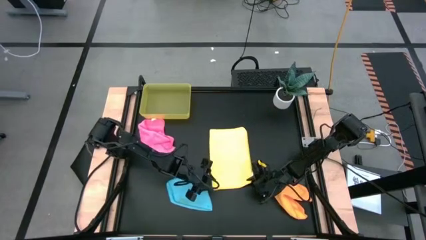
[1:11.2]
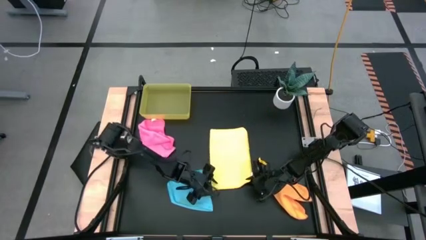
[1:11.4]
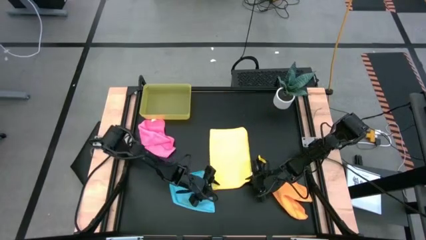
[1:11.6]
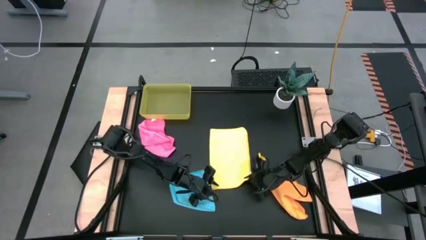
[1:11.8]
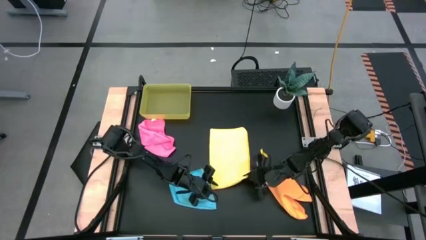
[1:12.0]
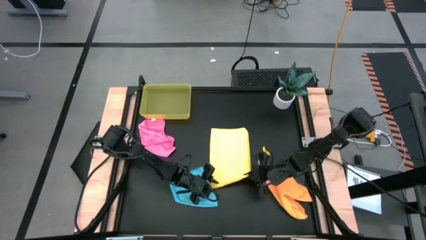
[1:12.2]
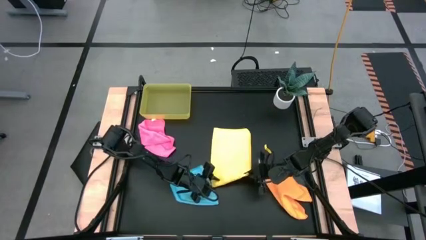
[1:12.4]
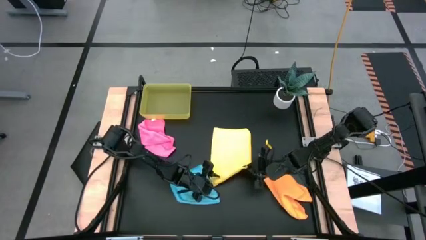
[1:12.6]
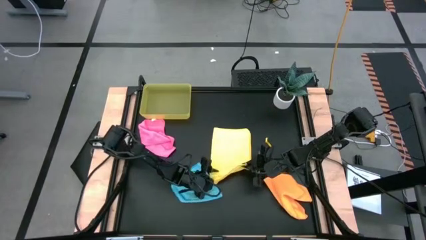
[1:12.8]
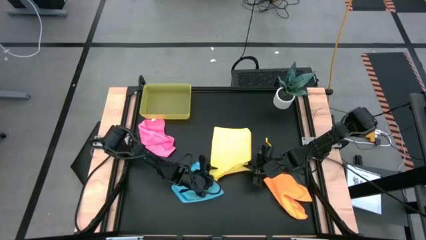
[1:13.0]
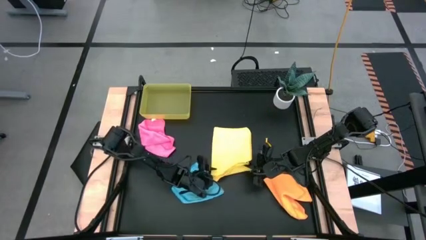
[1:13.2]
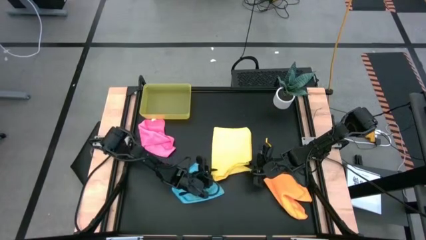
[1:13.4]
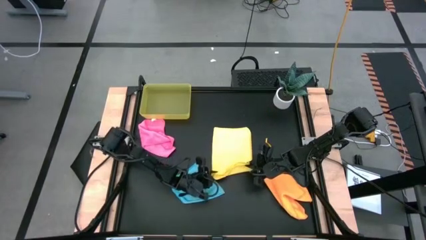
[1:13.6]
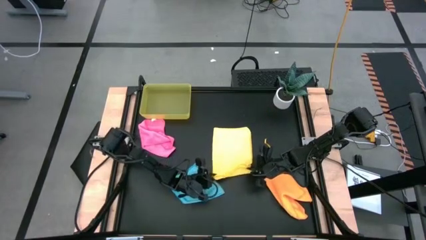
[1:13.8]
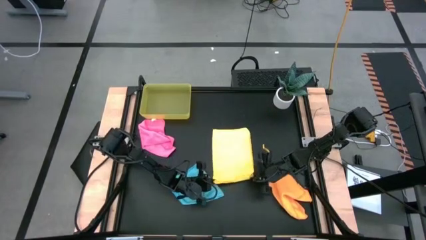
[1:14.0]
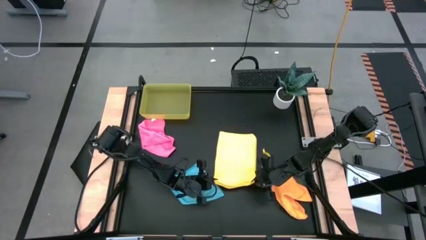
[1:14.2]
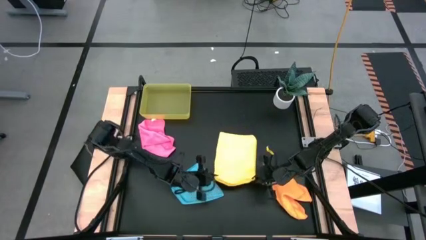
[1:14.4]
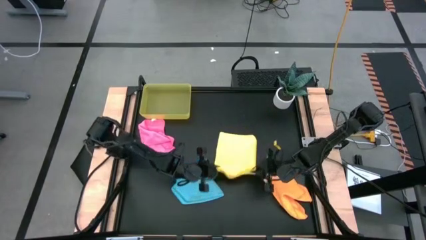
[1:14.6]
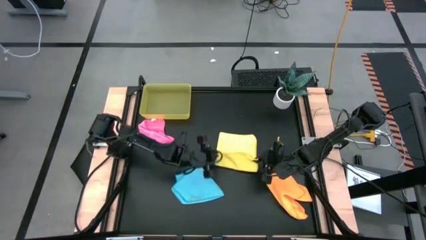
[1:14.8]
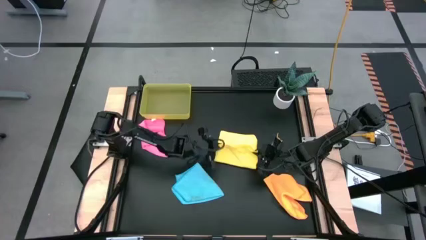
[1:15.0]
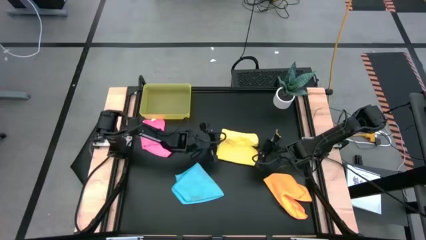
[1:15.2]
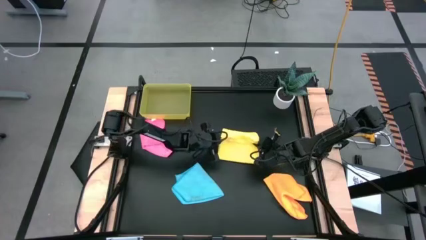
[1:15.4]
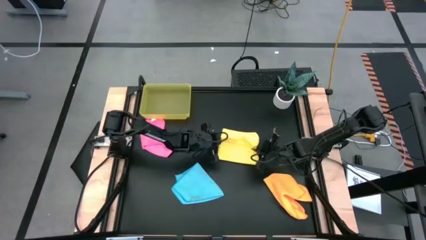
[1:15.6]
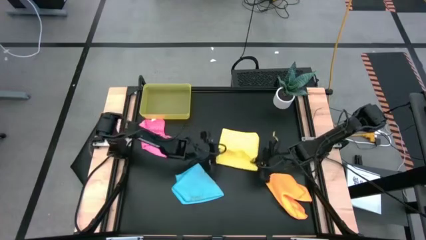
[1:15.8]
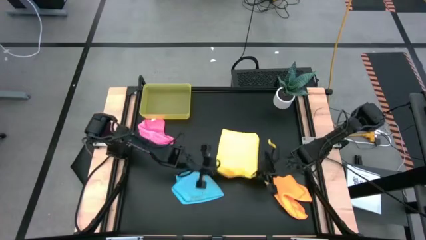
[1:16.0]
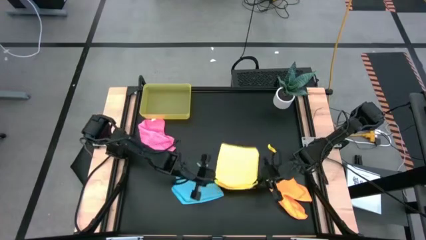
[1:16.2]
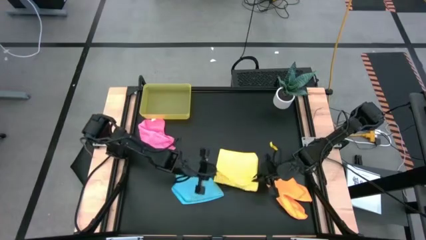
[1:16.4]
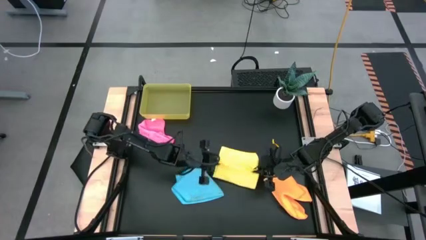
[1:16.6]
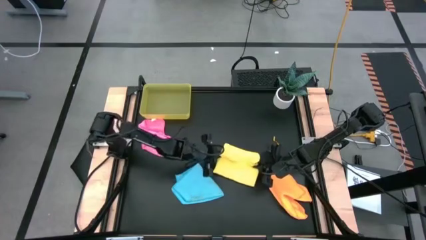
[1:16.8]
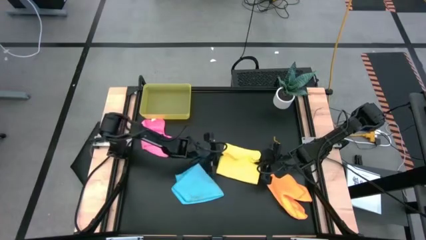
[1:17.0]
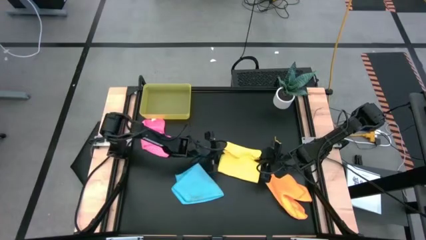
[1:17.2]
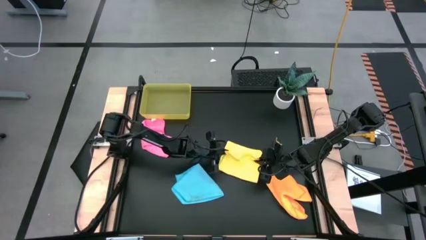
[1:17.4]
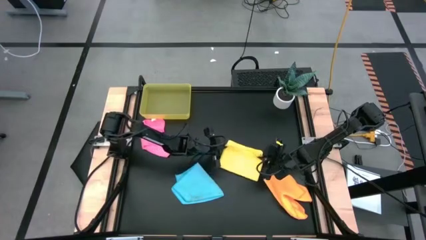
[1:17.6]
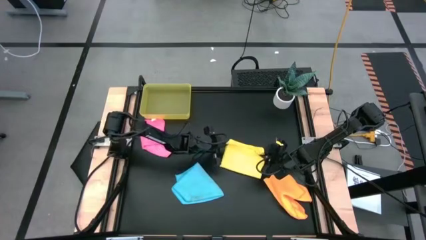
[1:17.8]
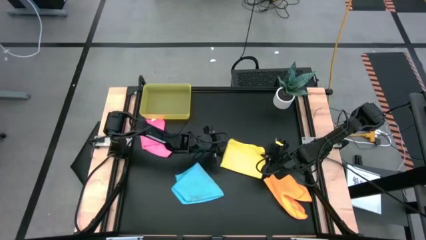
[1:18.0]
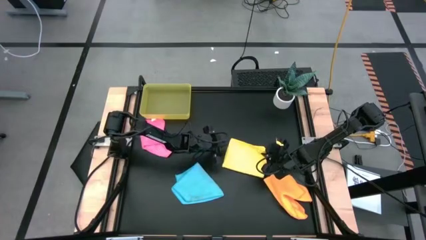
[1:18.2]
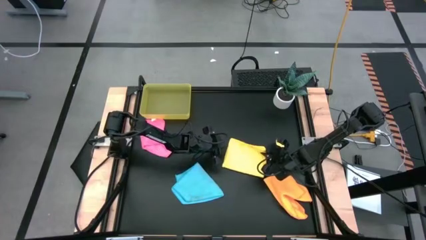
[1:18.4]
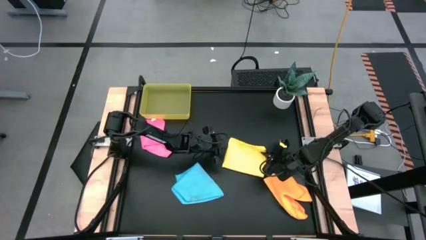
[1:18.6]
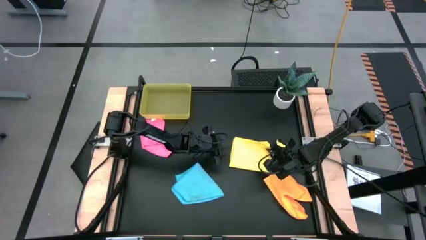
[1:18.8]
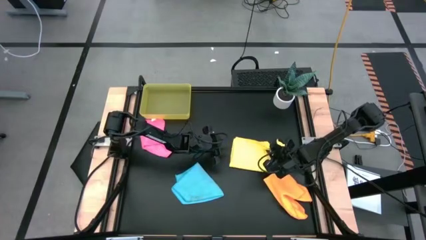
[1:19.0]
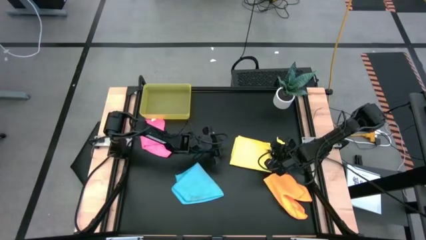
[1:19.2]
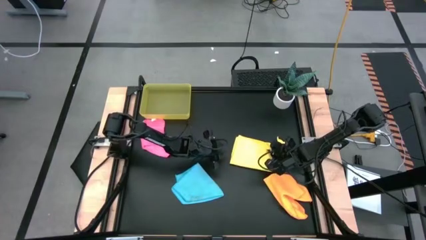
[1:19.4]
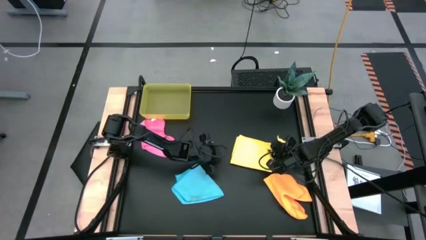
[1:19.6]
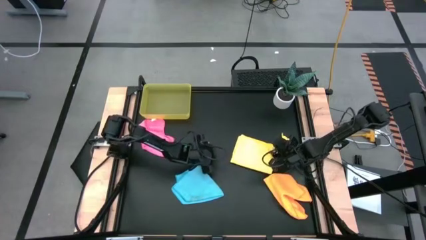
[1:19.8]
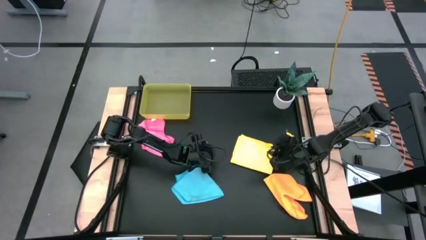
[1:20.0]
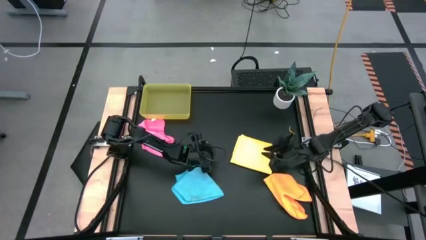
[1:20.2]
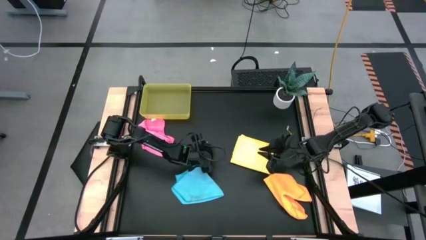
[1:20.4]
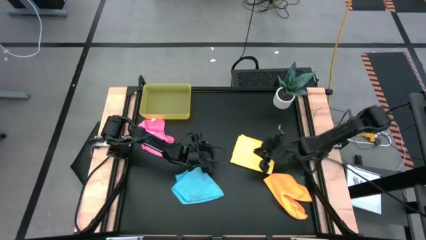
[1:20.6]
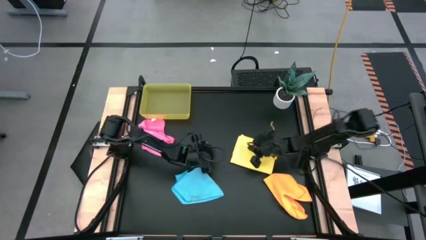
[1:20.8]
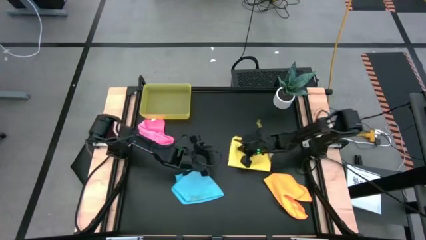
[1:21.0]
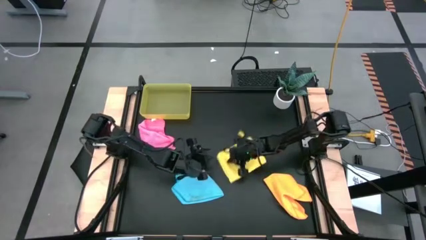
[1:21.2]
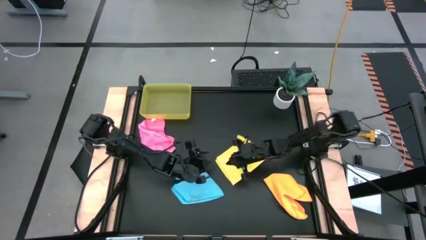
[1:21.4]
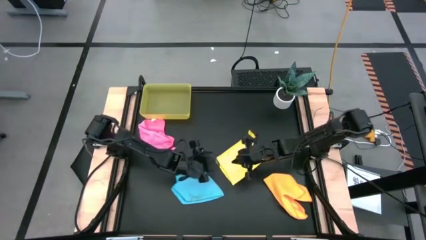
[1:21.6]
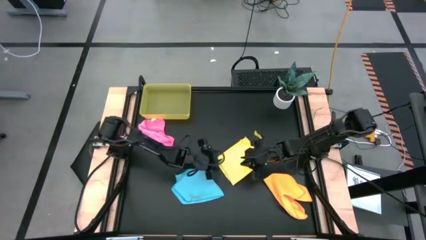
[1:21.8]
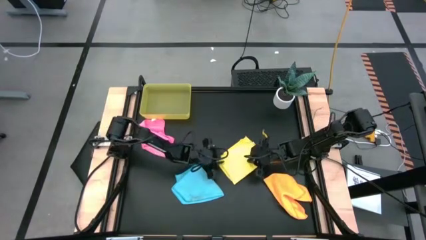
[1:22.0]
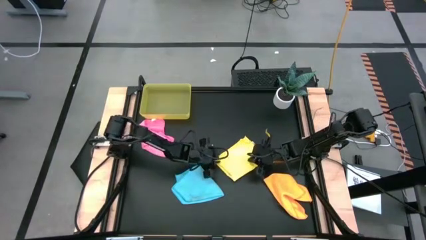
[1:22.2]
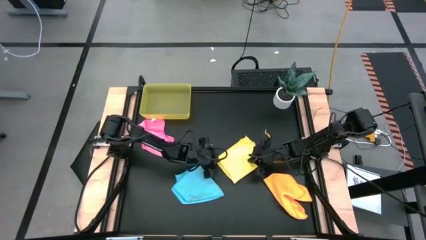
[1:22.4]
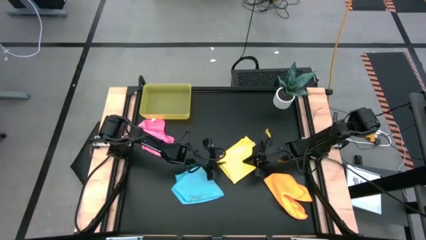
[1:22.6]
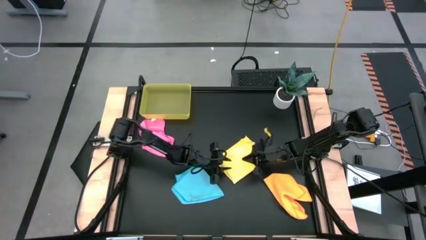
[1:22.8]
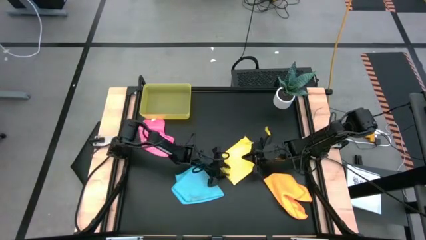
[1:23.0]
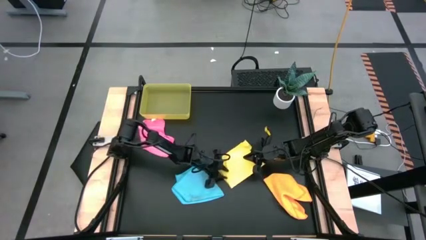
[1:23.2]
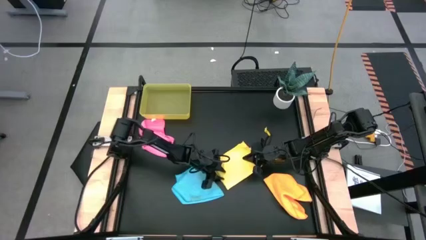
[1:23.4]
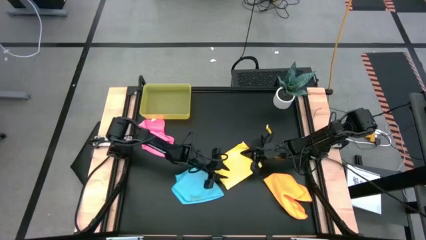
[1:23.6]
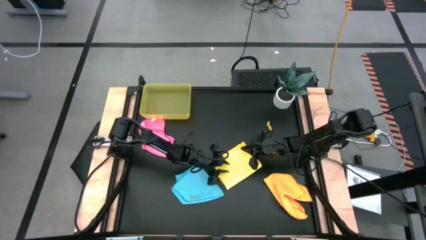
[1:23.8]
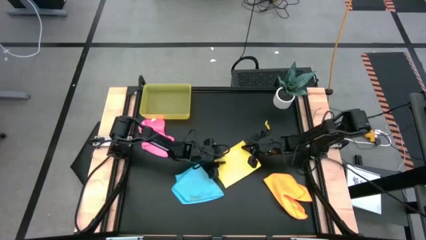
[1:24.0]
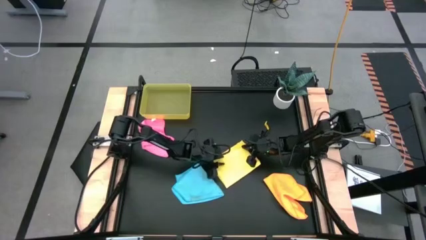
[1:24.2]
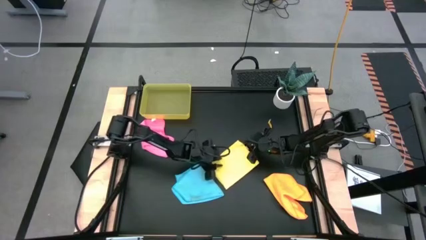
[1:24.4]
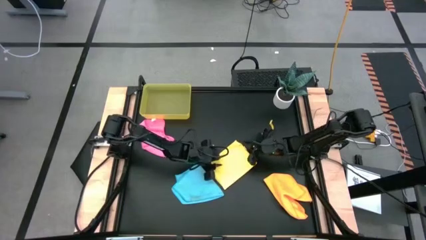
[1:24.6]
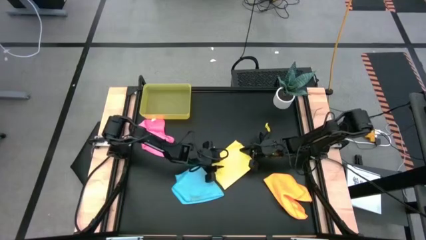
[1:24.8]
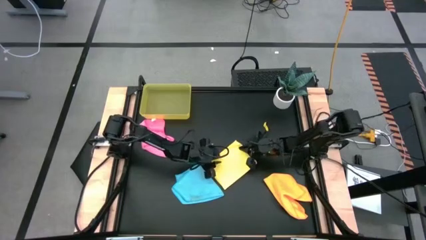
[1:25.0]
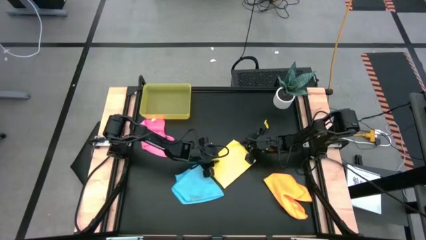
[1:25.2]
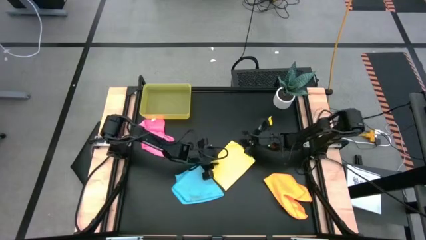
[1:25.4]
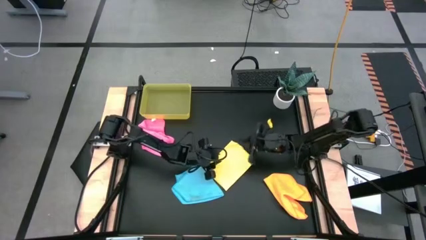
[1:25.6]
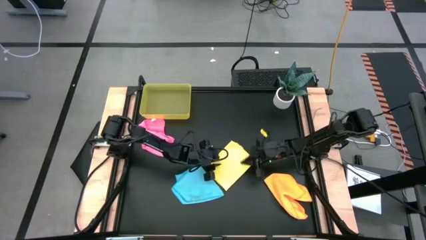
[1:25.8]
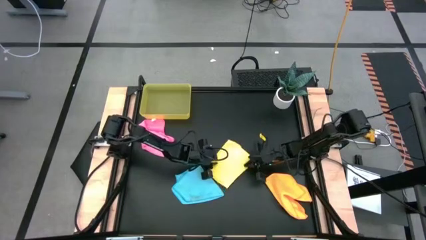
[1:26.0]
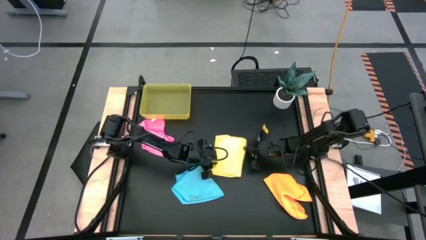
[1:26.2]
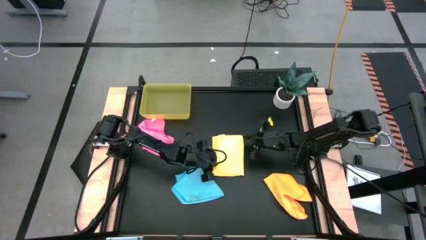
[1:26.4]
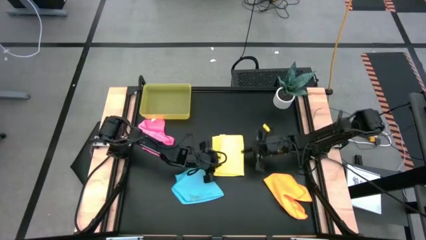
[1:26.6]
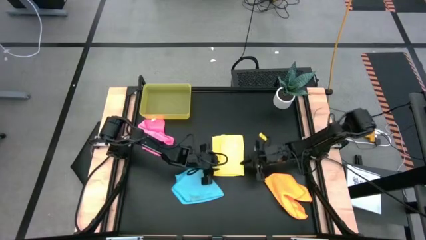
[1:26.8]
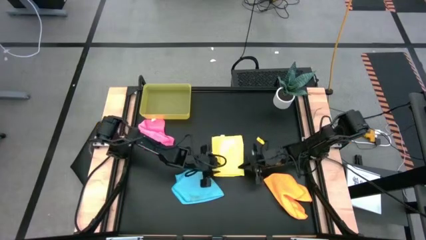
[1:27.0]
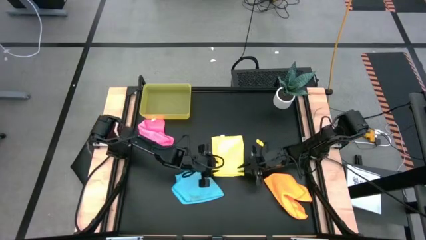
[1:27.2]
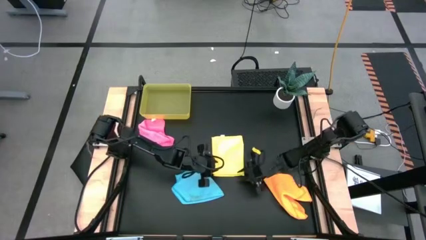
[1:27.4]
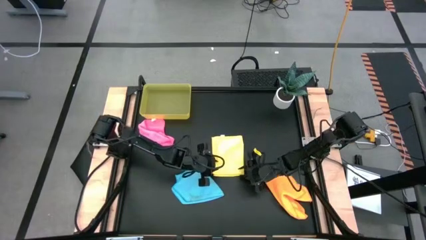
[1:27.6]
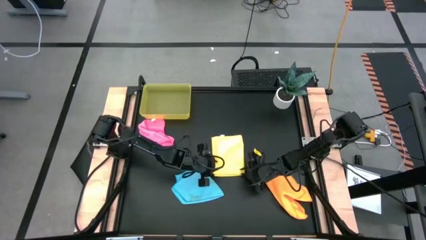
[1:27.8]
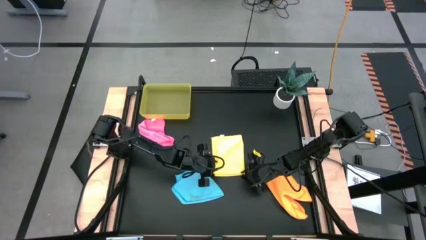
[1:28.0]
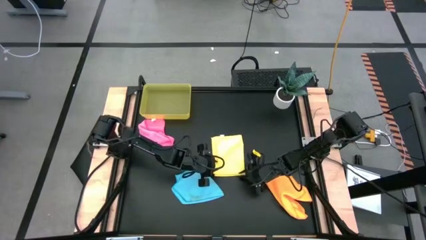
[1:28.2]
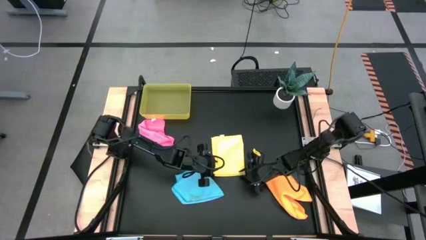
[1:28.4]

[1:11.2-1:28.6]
Task: Fold microfiber towels
Fold the yellow microfiber cloth
